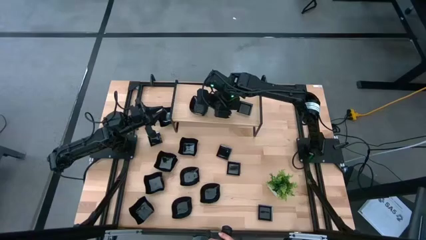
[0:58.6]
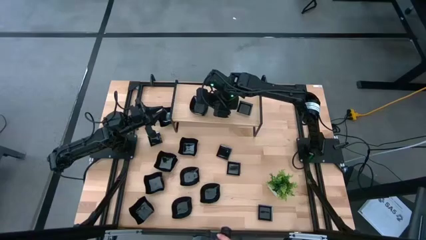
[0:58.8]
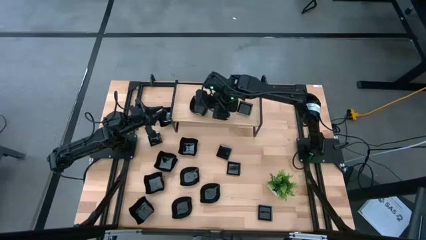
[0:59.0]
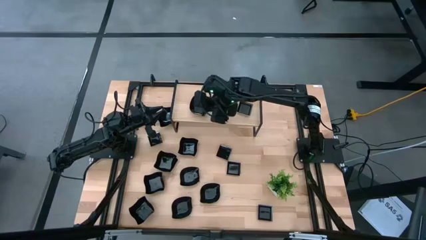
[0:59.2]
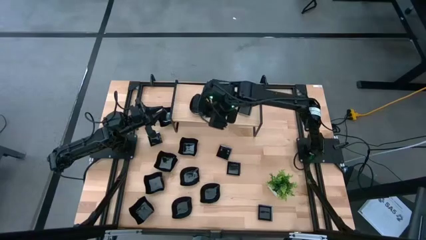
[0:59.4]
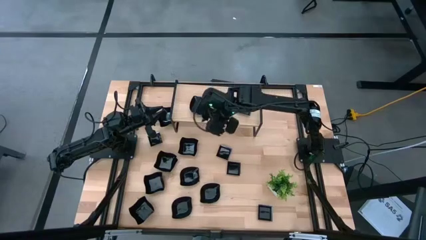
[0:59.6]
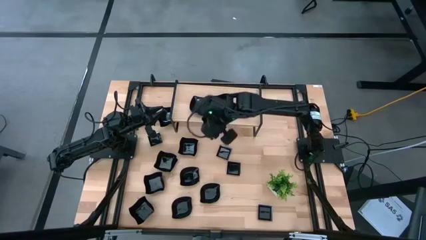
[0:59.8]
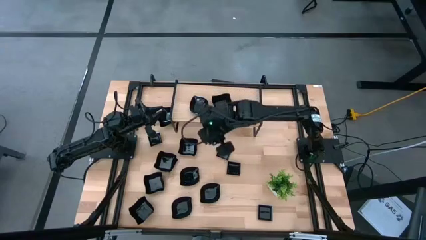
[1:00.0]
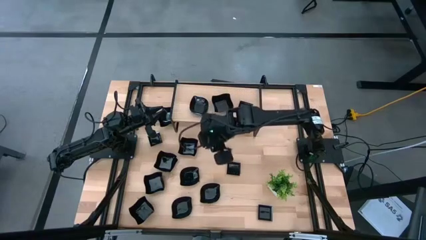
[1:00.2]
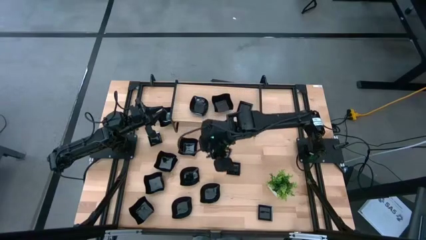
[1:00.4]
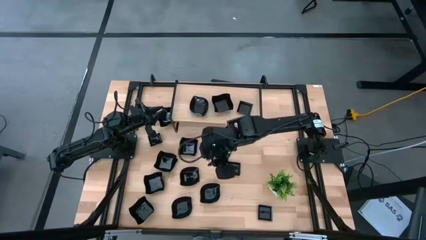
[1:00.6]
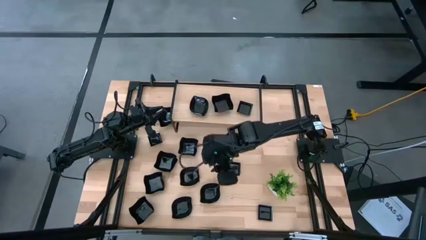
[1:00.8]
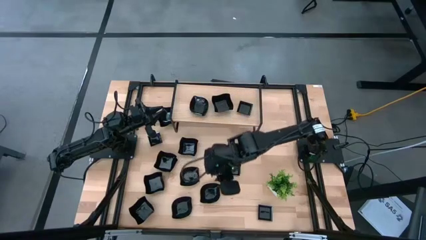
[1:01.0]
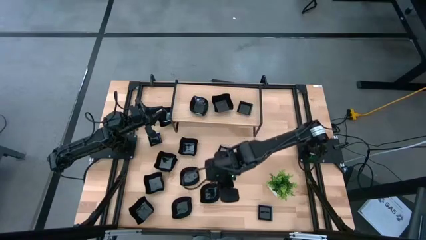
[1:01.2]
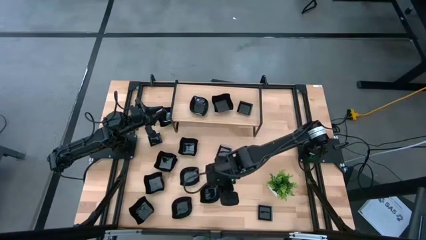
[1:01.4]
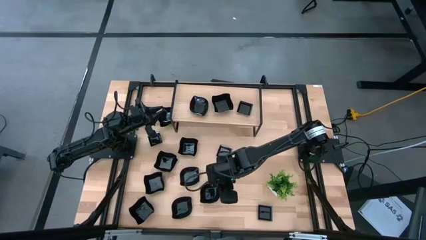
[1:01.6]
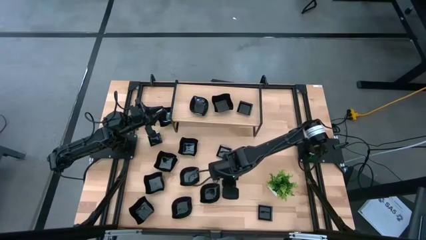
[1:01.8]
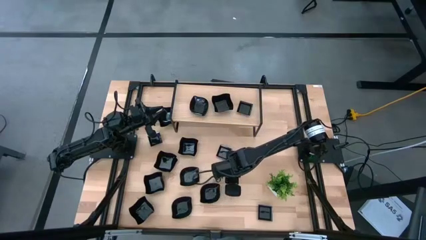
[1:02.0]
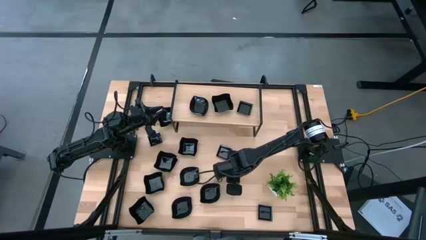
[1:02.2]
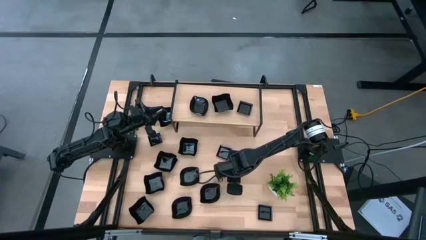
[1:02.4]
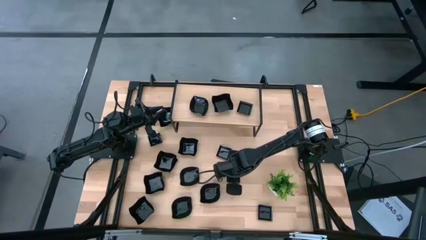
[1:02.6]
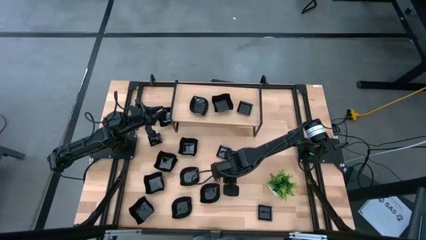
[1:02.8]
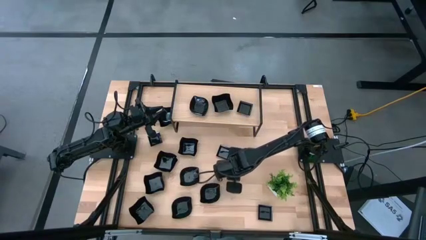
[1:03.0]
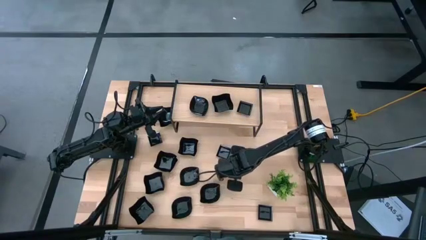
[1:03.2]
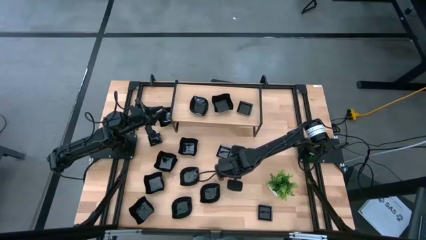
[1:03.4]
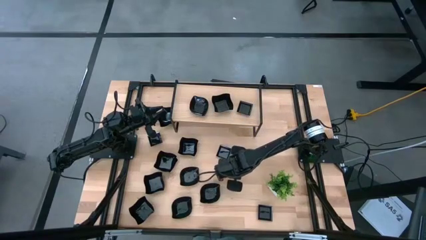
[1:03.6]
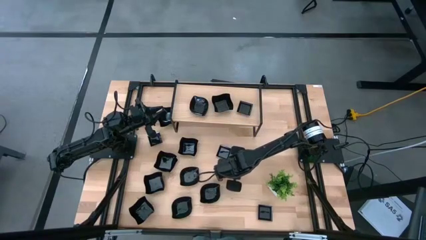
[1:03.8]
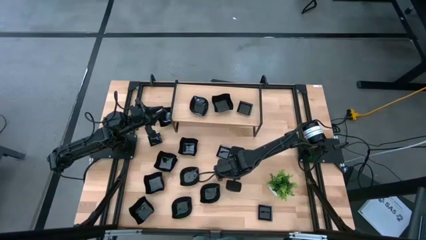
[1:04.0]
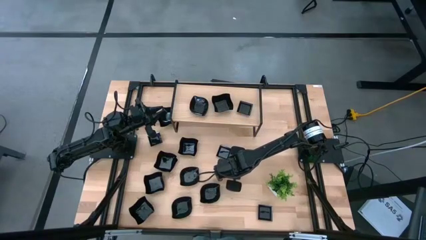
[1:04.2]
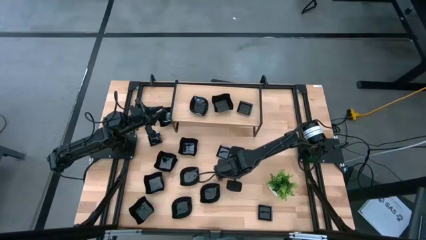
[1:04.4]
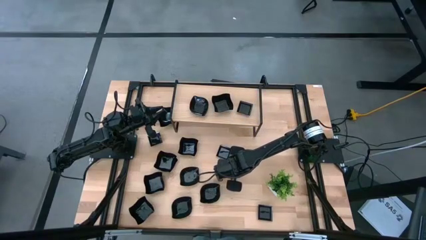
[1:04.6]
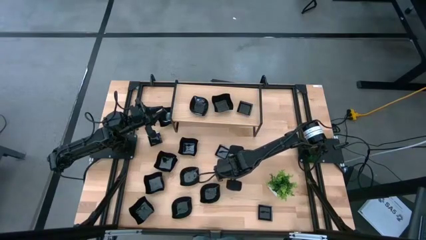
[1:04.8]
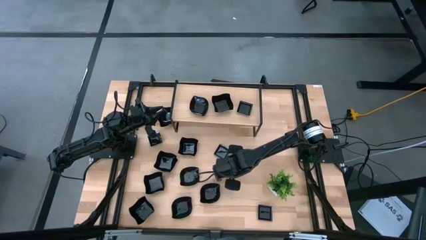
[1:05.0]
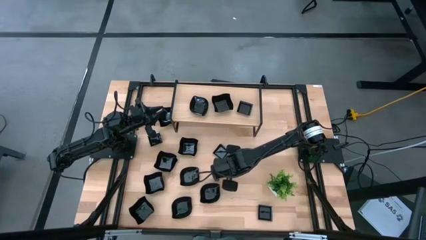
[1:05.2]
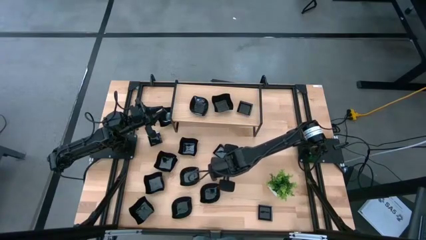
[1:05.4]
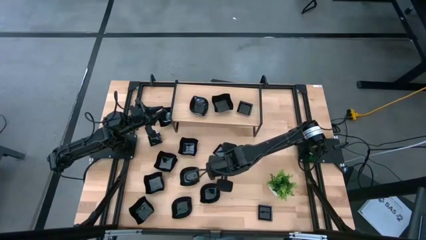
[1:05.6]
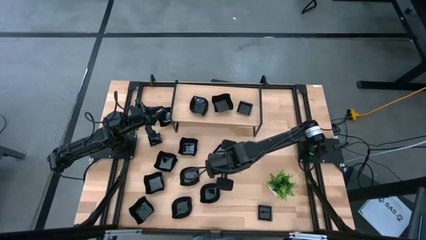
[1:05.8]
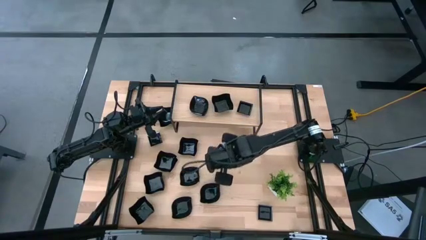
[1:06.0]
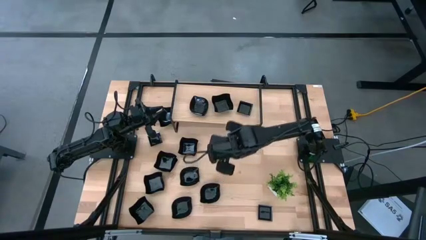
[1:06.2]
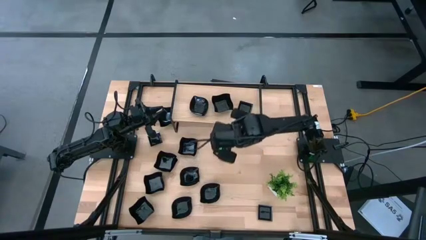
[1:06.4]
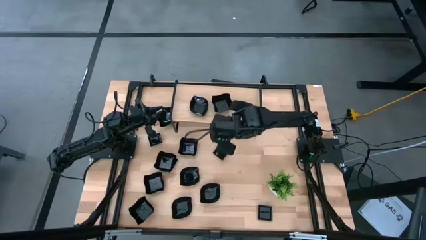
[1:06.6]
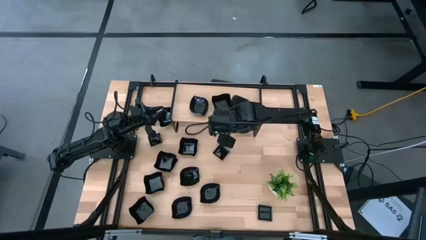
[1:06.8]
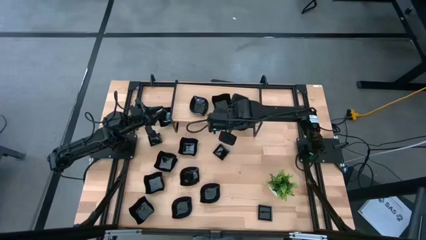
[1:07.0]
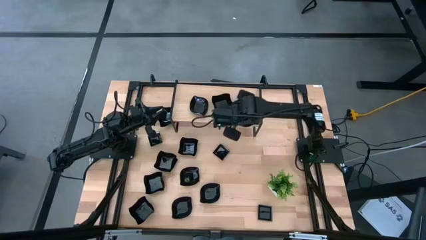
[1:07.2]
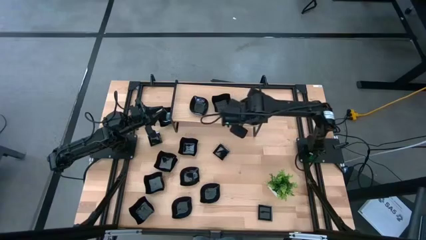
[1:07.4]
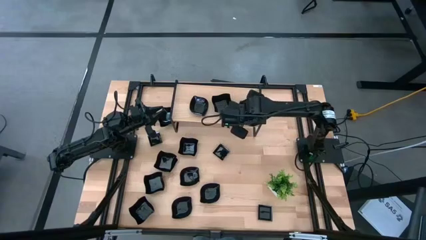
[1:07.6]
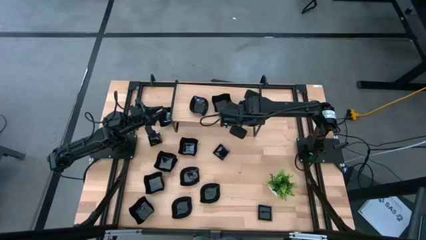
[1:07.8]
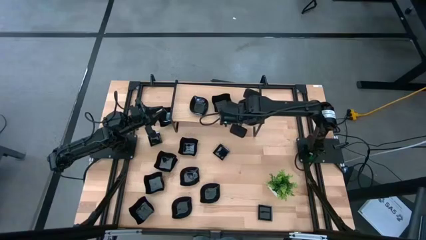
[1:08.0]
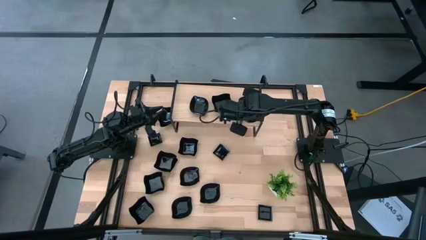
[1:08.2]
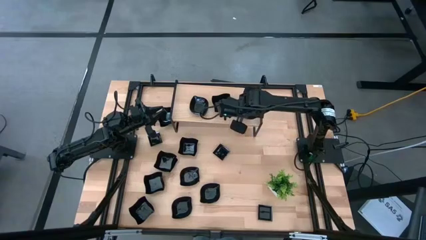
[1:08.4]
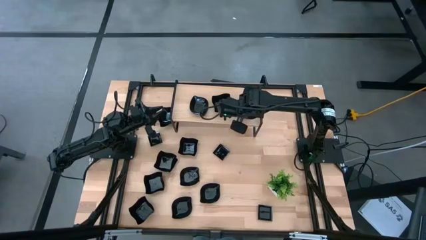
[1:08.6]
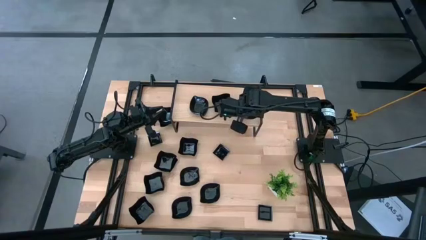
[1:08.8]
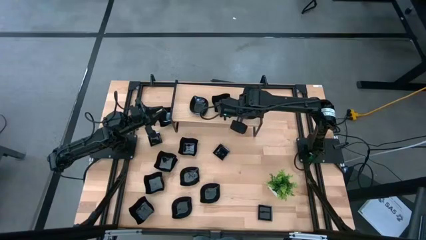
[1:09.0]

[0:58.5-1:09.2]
Task: Pick & Place Mini shaped plates
Stack the square plate on top of the square plate on the shelf
